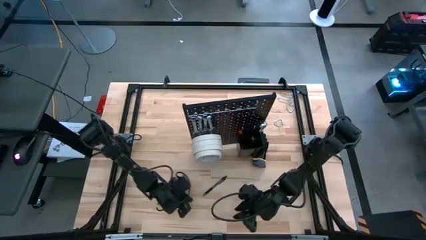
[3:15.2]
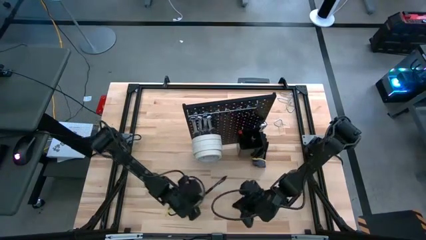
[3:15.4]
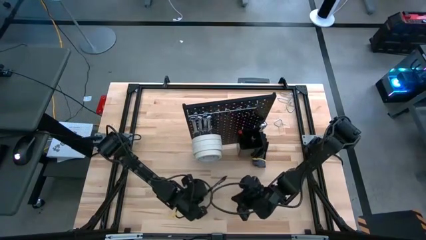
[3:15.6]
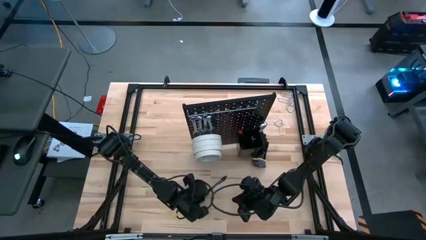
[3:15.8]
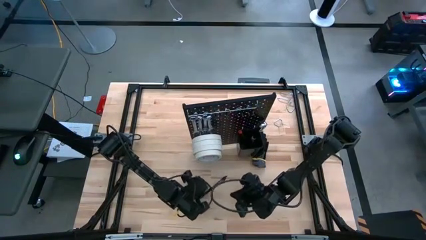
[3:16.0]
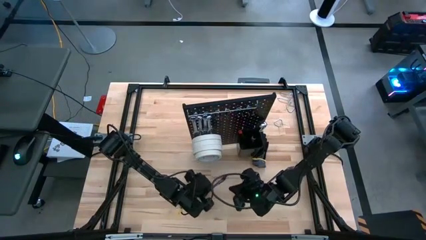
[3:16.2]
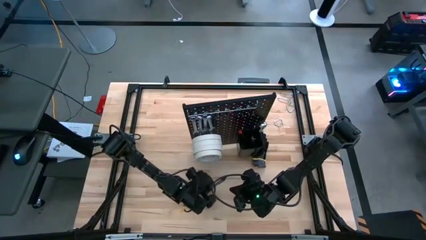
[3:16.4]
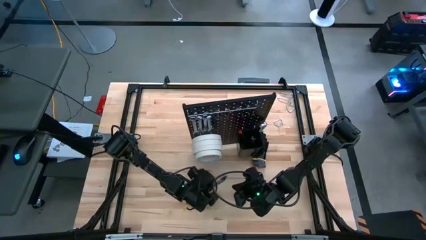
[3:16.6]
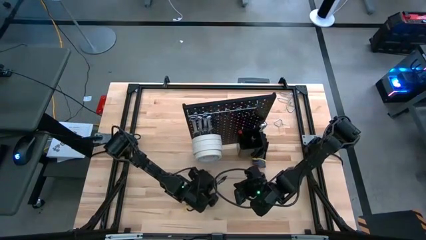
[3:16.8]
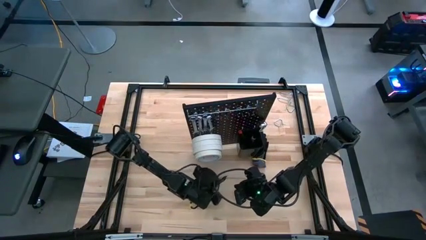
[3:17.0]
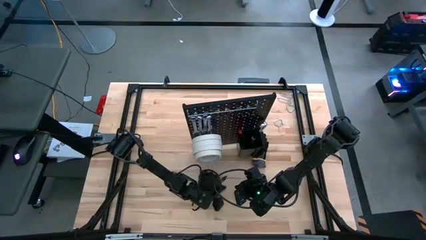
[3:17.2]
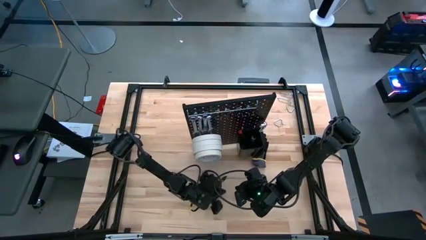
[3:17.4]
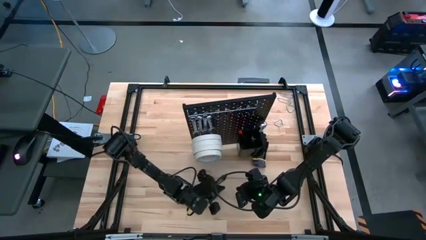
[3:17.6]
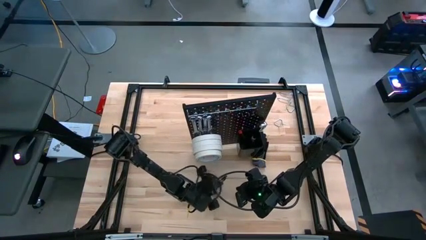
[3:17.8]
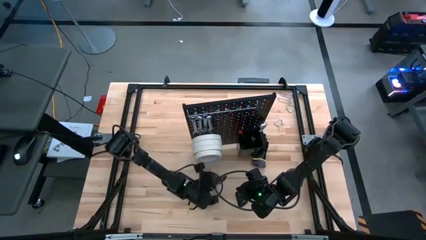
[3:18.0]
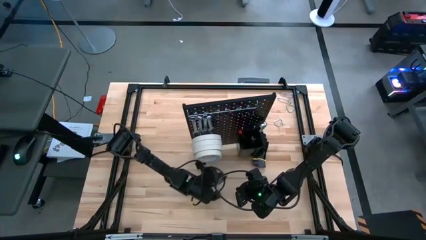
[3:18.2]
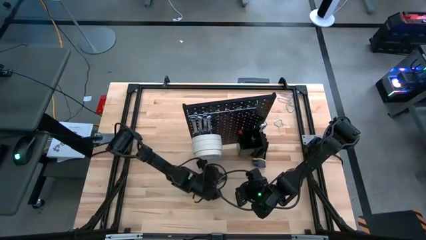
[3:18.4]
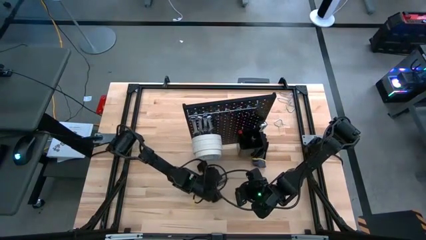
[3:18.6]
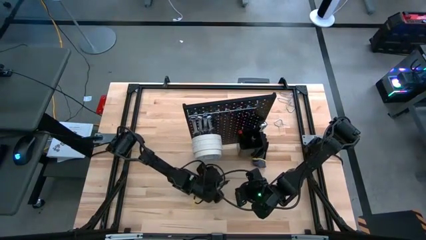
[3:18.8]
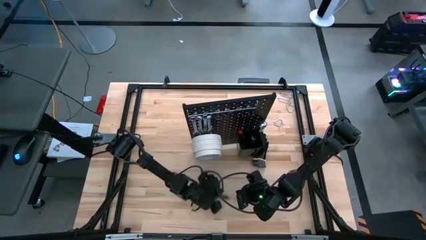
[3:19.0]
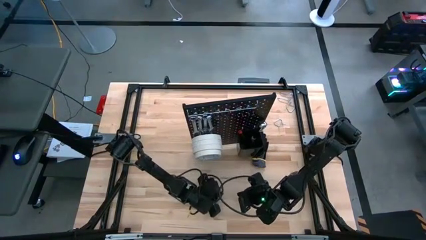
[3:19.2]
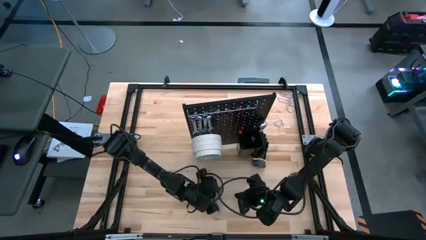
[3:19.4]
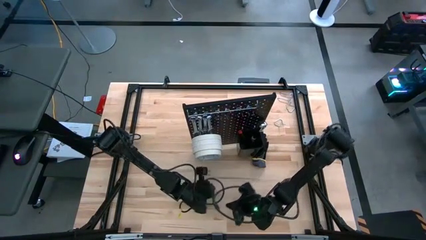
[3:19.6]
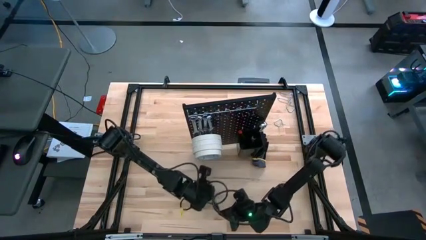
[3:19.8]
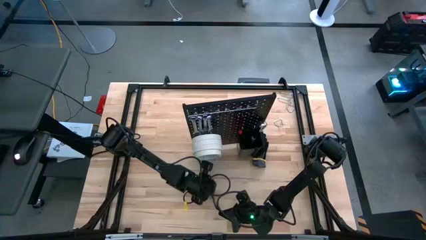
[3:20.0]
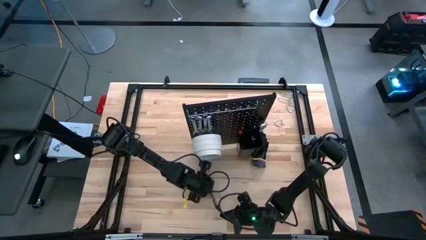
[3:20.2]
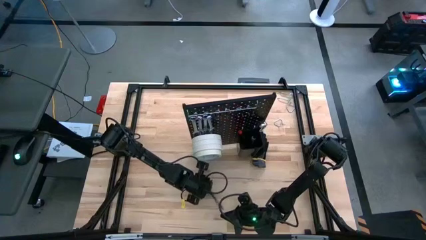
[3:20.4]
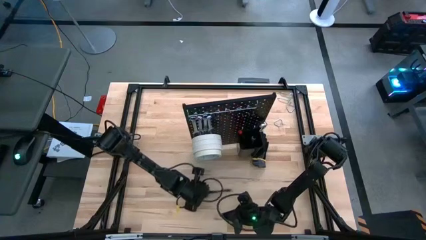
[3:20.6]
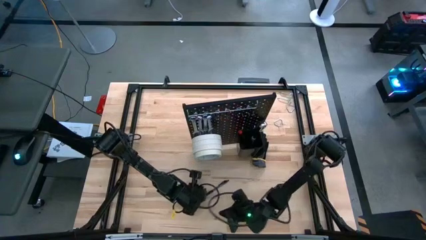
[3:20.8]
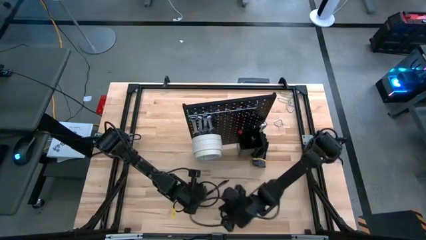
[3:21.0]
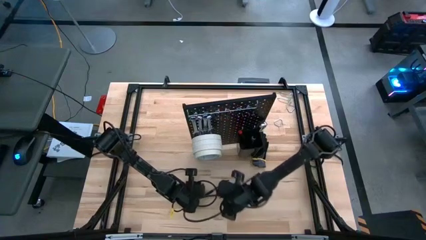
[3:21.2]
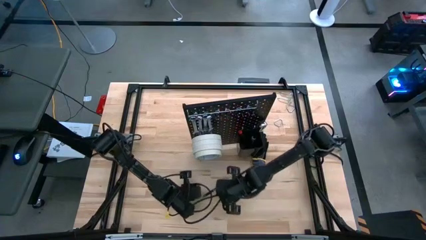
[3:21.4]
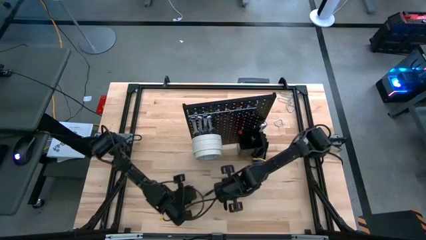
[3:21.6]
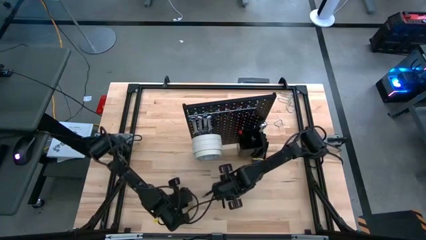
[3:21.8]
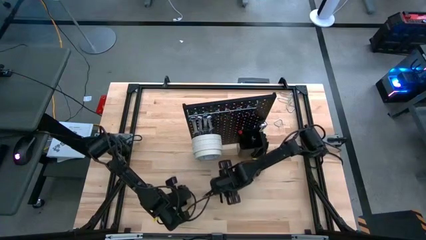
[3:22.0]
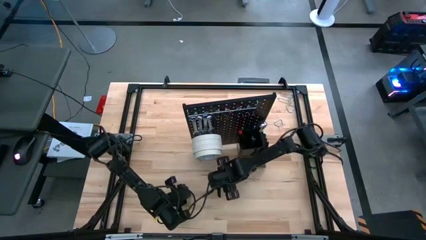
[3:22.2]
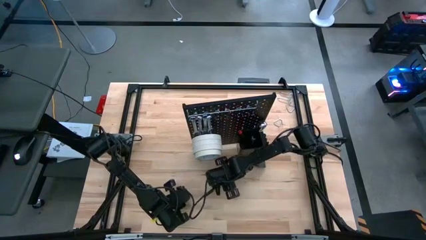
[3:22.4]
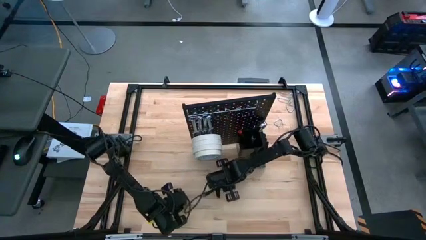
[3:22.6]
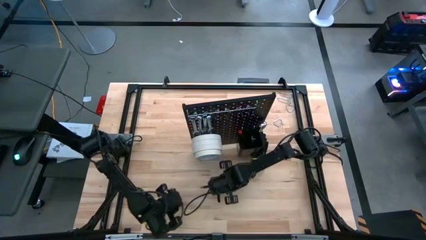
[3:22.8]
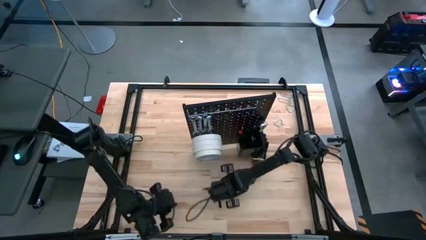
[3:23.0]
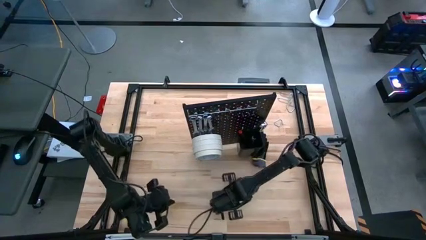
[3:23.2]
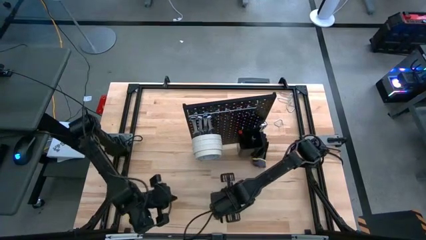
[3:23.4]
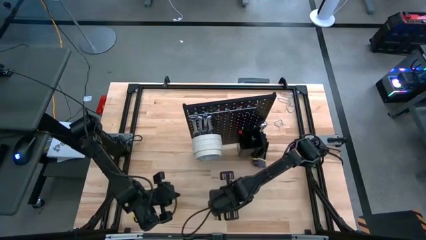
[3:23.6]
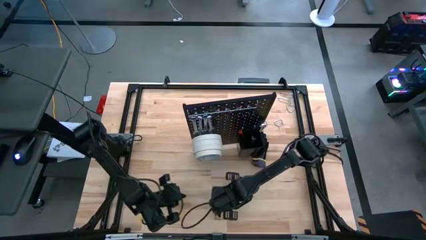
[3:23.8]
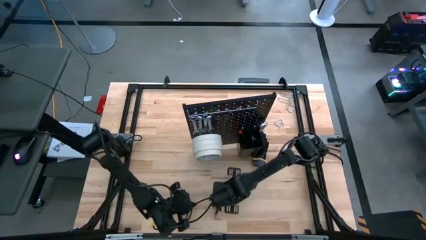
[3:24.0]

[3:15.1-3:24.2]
Task: Hang tools onto peg board
Hang the black ballpoint pen onto the pegboard

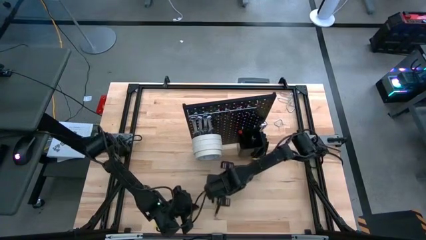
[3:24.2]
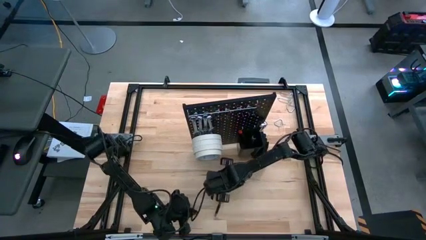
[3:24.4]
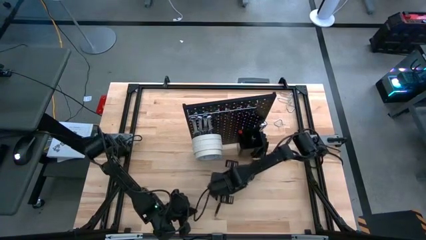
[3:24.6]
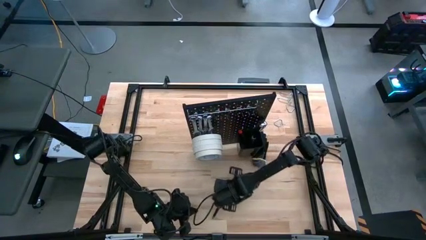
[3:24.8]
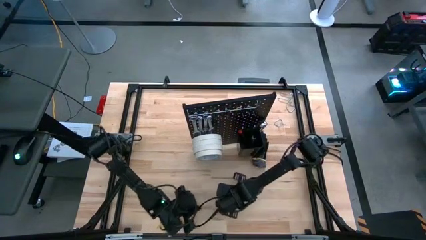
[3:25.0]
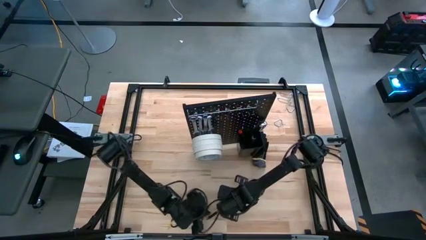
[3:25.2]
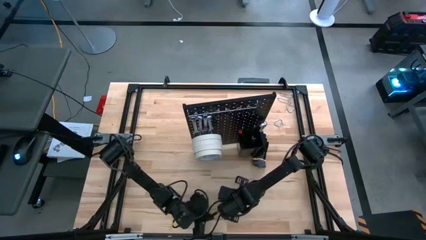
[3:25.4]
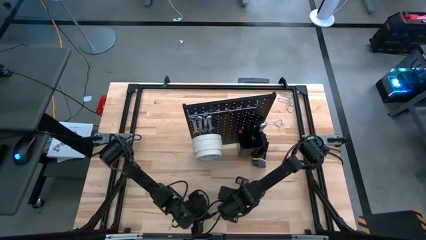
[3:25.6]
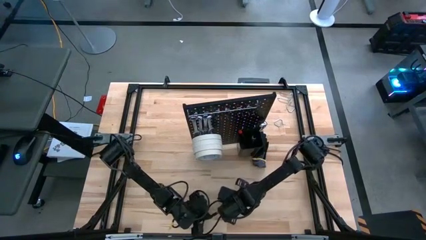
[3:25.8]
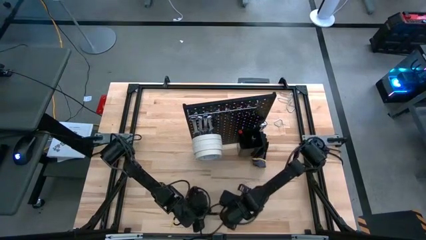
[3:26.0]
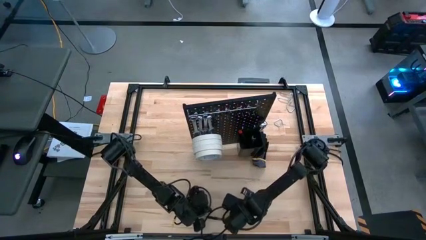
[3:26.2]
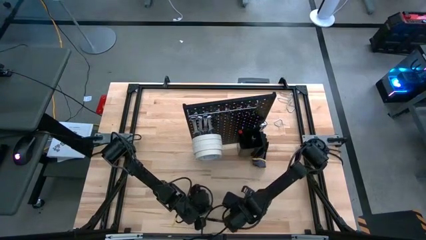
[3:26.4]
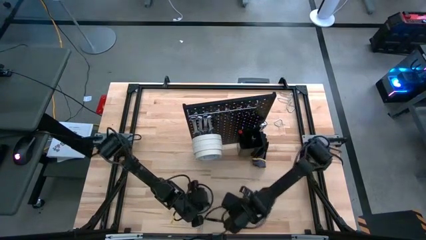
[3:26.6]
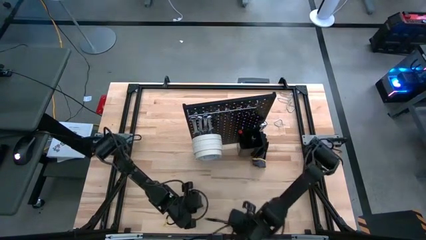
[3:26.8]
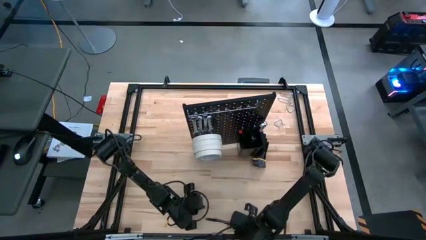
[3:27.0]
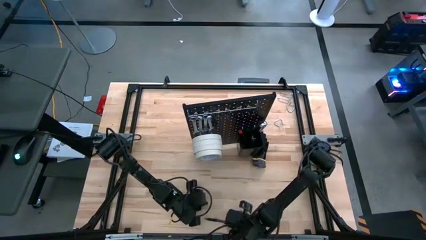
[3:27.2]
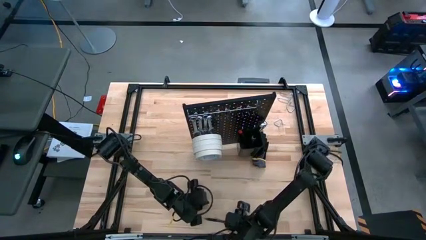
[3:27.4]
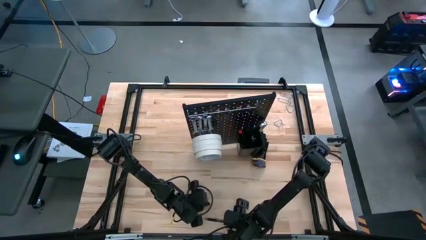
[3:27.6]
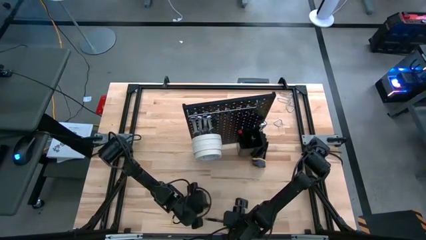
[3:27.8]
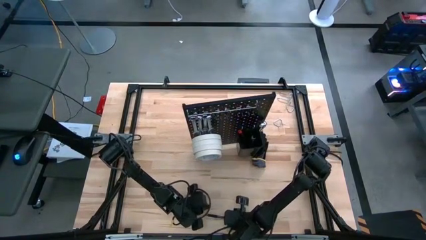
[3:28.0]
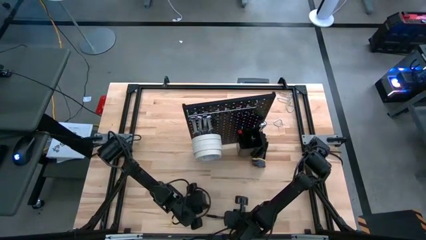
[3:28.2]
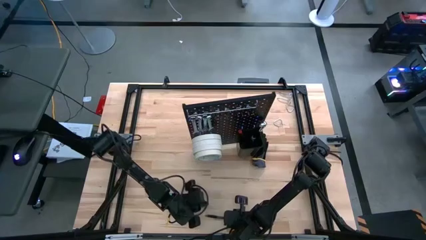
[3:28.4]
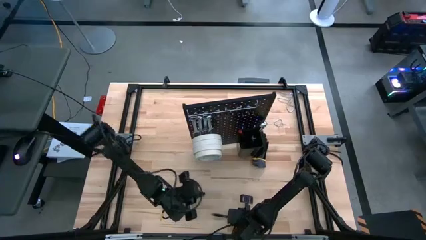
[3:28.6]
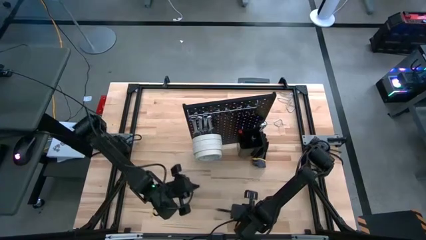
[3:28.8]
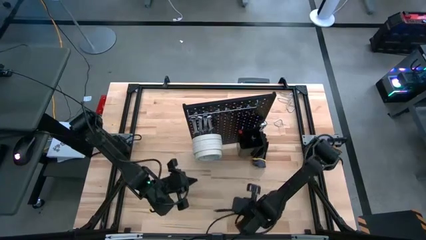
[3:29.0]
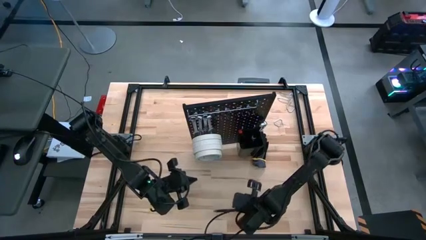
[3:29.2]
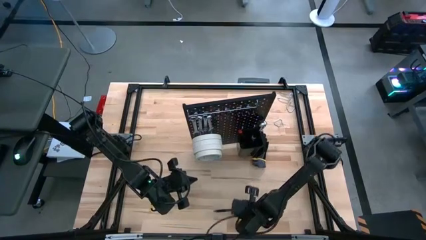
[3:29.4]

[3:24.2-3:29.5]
Hang the black ballpoint pen onto the pegboard
